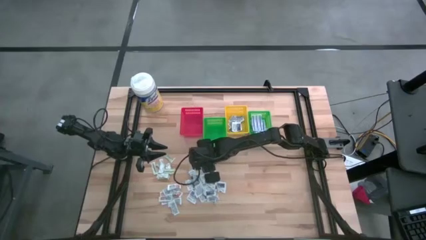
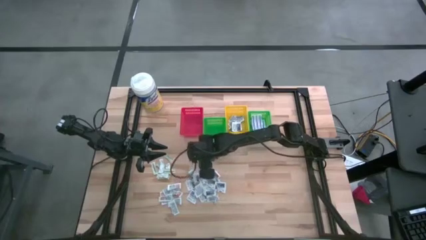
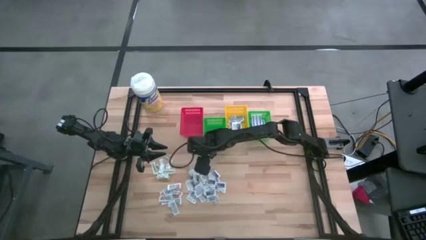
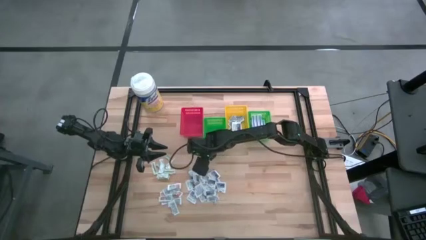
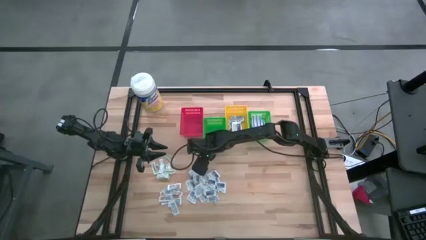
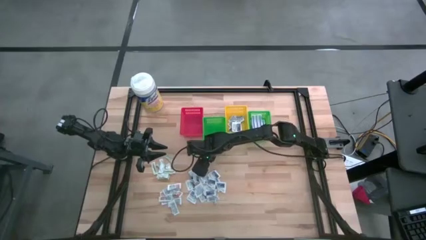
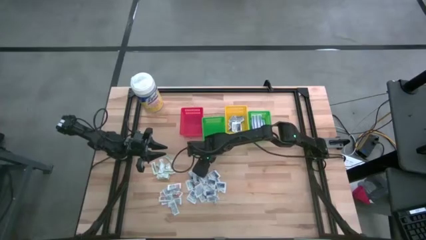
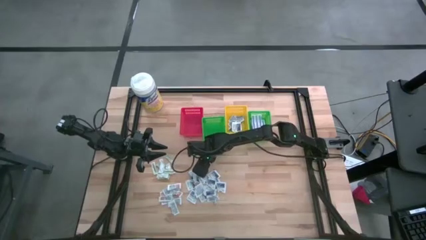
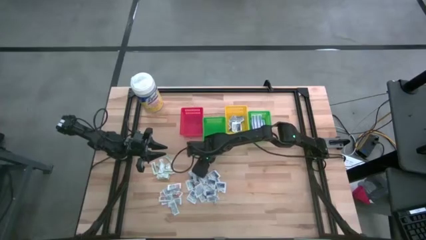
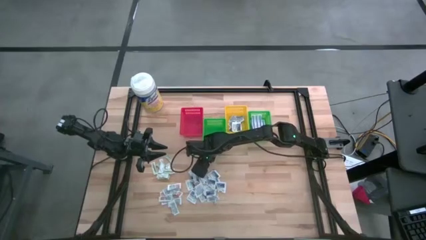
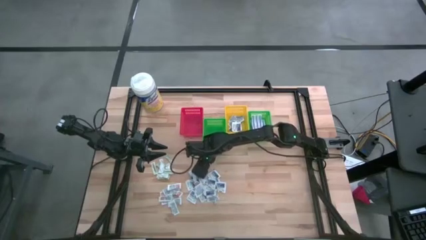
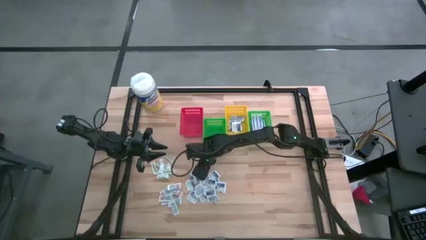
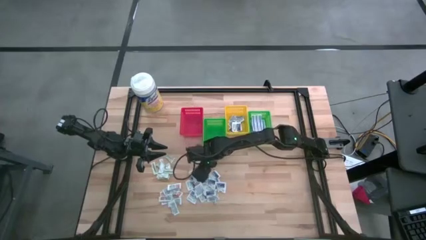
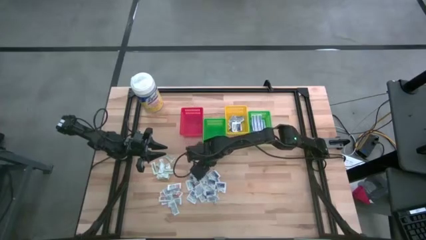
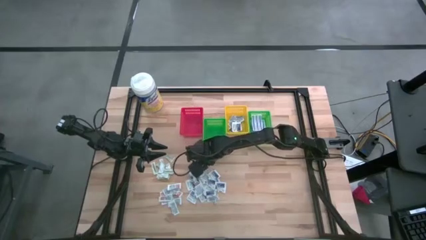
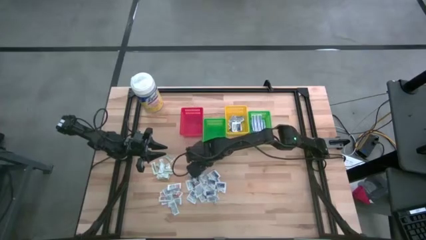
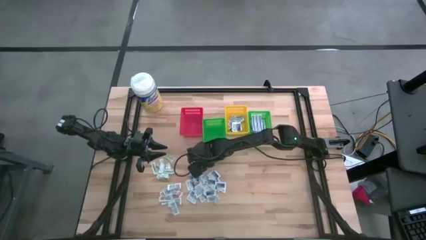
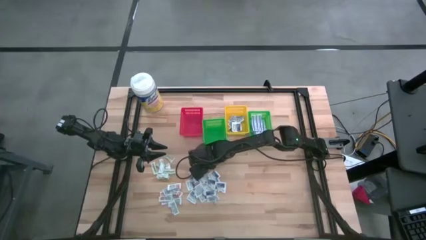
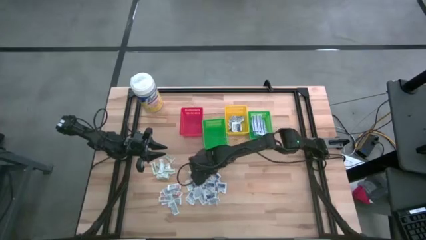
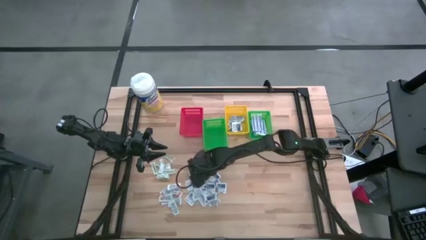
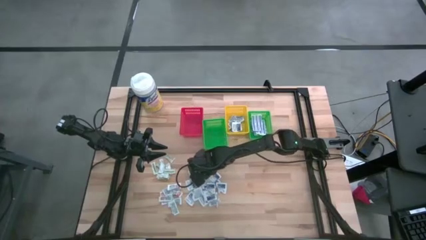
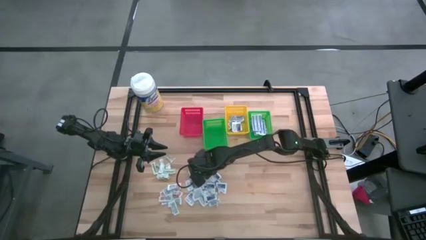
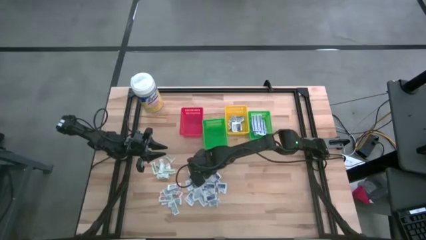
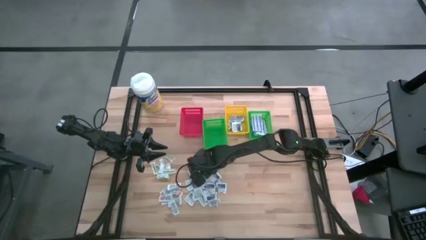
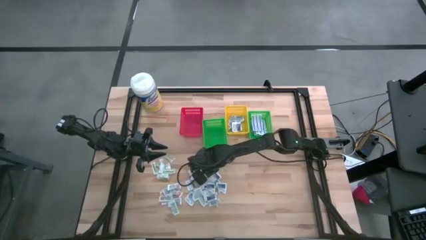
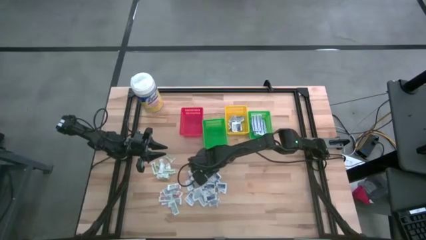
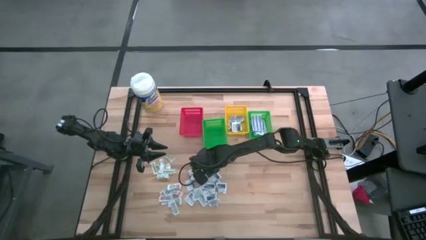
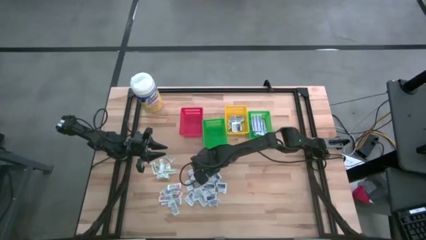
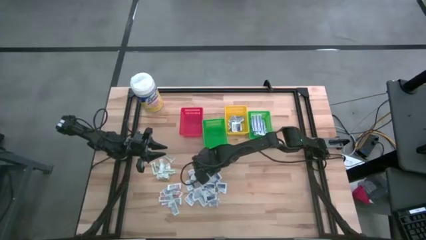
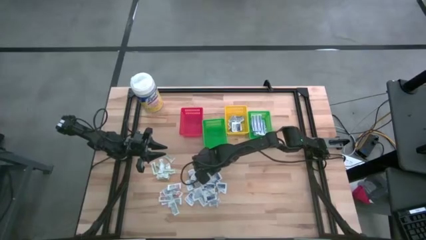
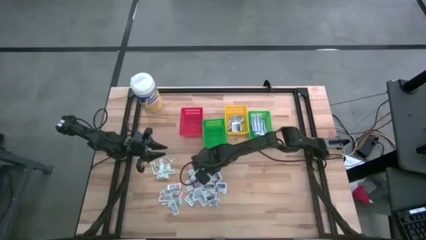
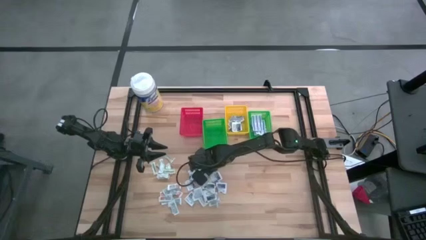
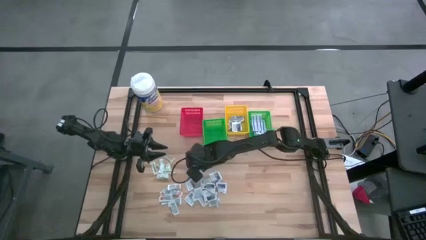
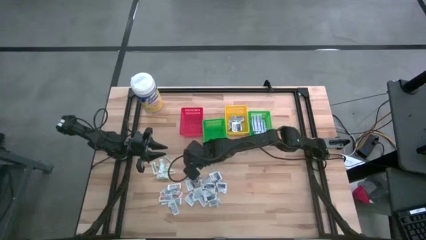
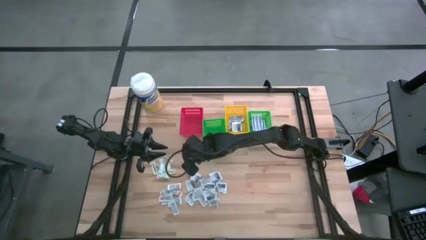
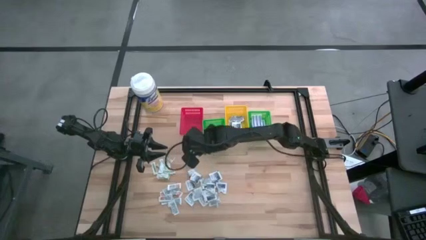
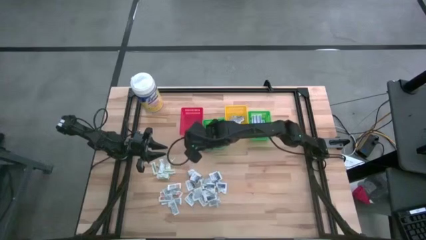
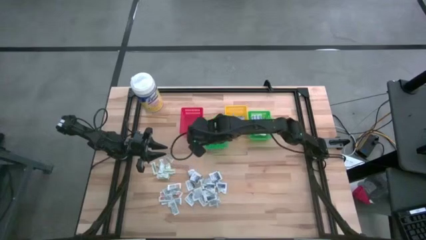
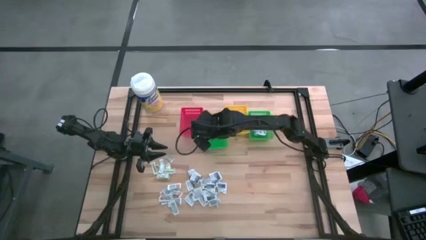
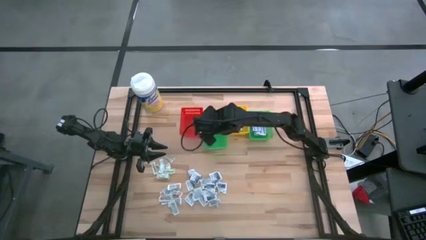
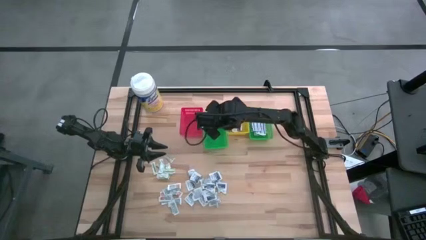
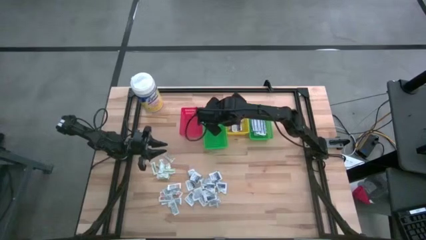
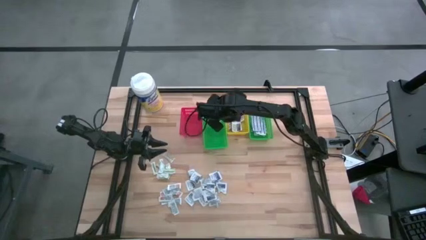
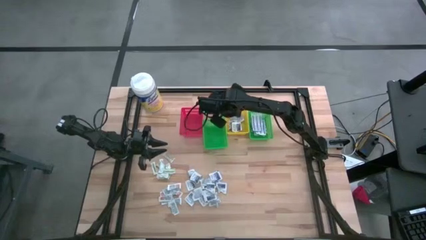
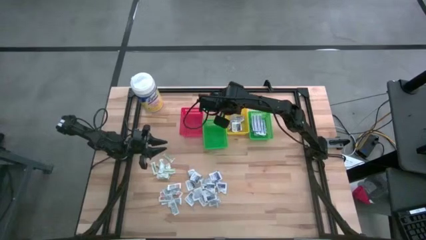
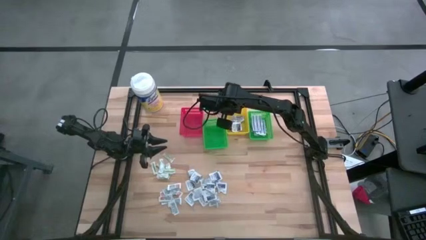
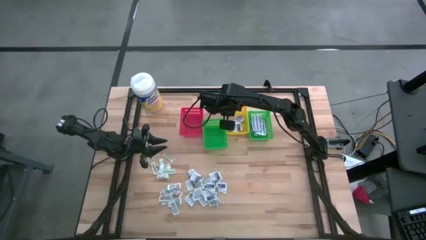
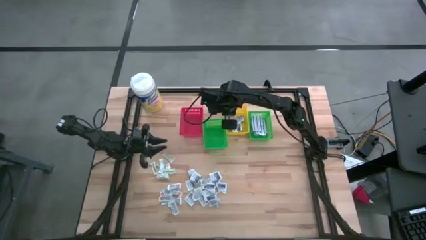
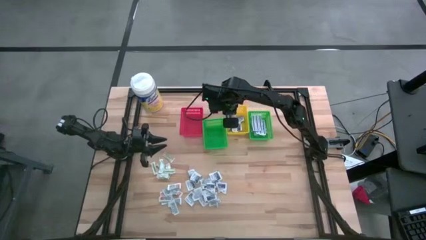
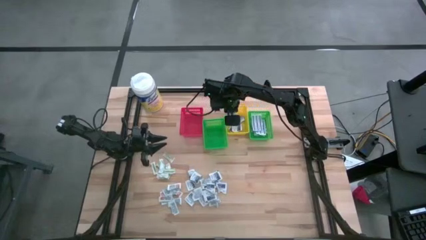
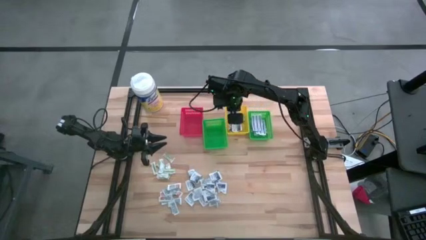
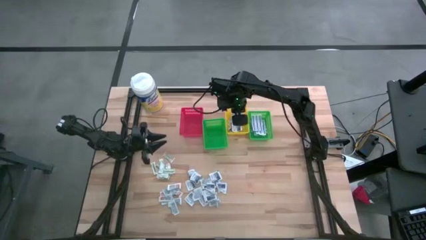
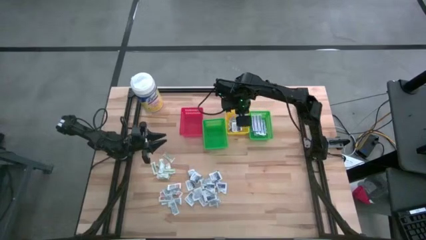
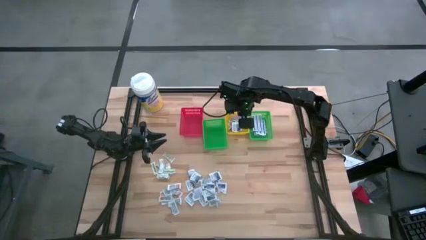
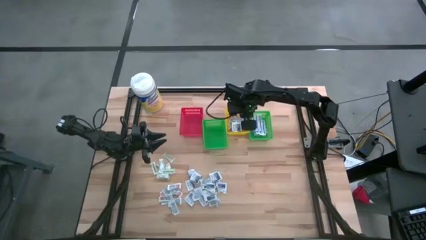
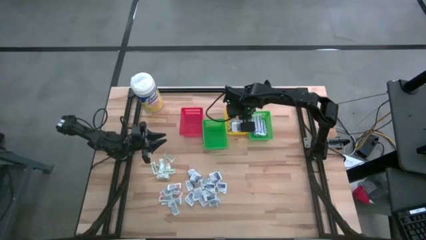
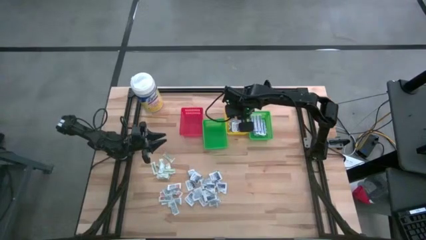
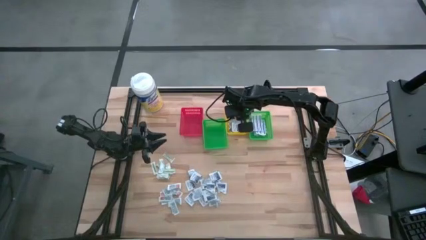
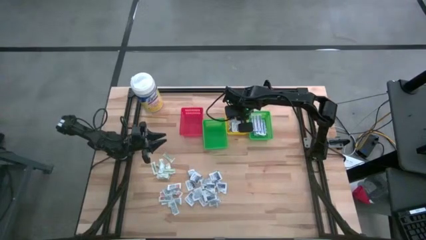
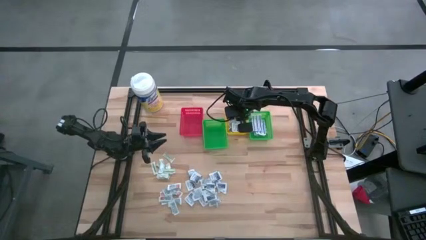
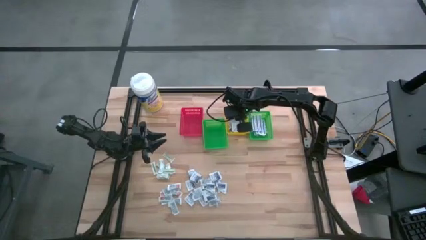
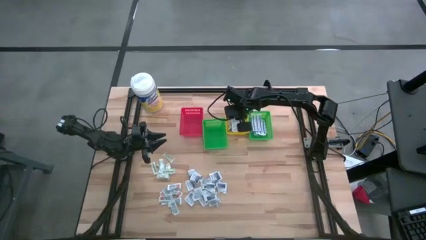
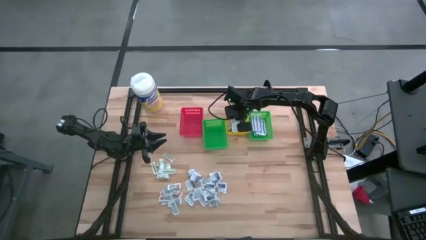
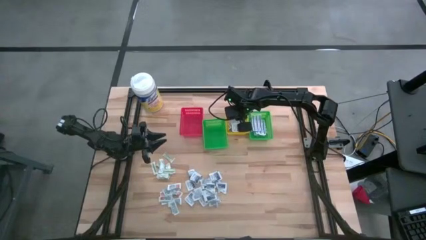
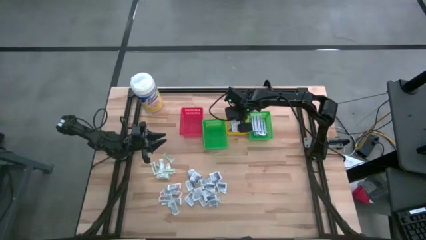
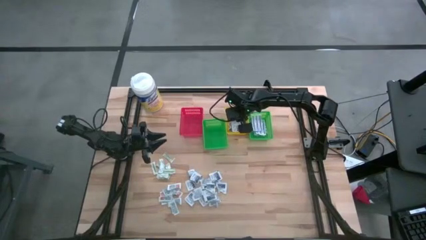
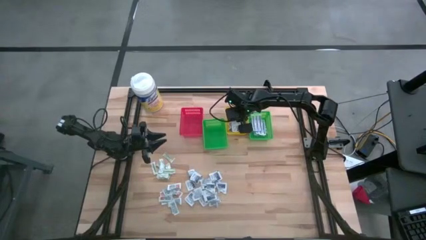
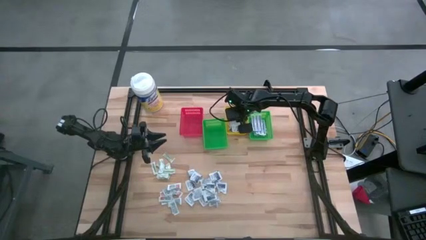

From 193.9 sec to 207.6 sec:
Task: Pick & Place First Aid Supplies
Put the alcohol pad into the yellow basket

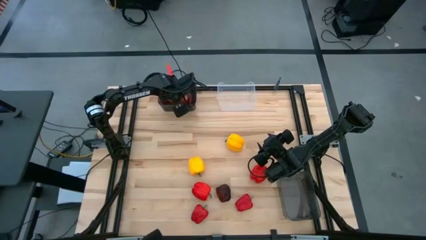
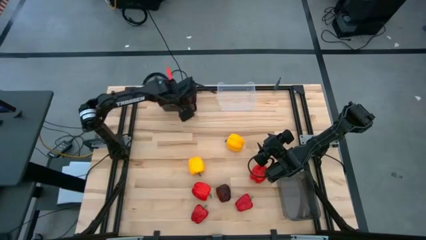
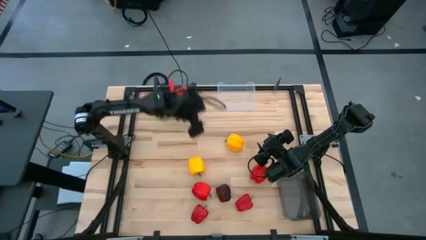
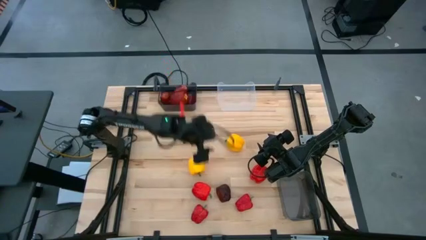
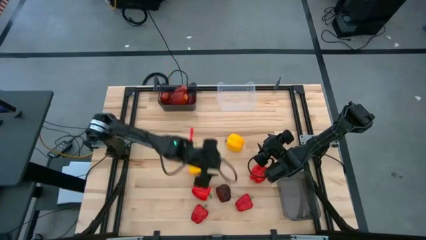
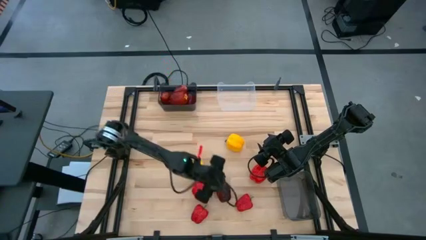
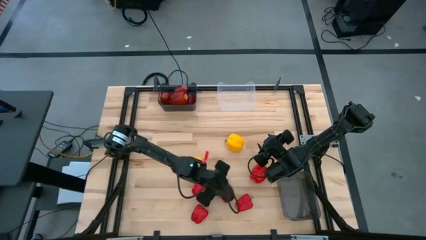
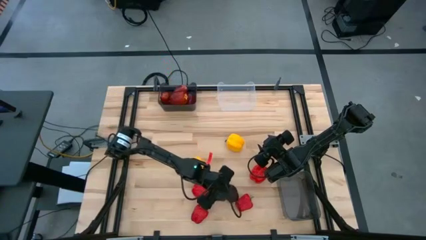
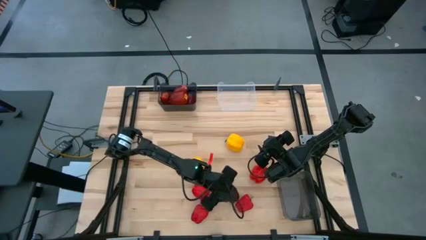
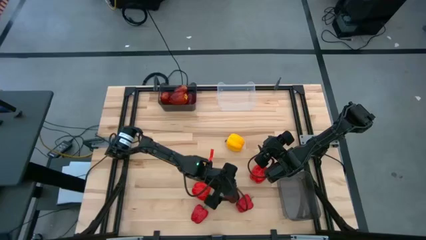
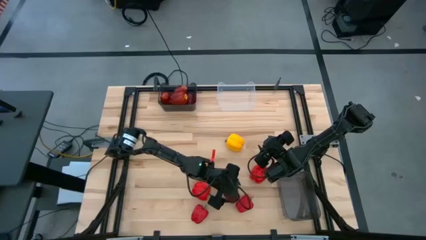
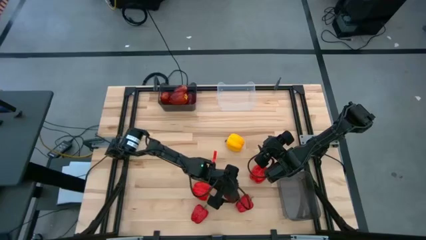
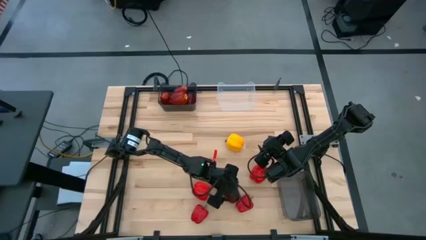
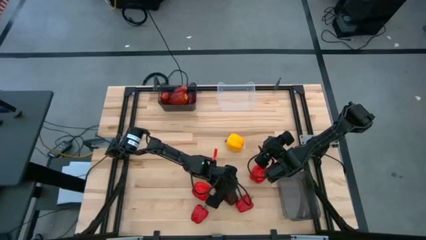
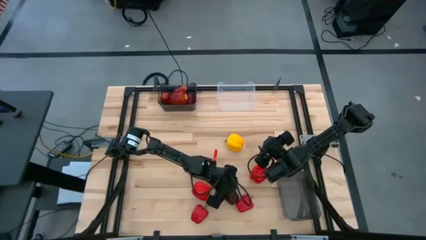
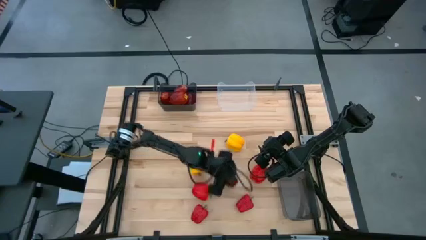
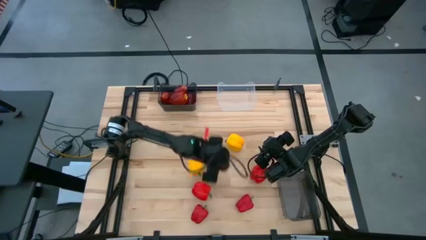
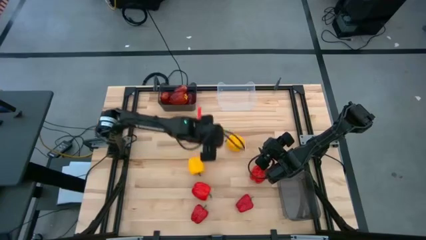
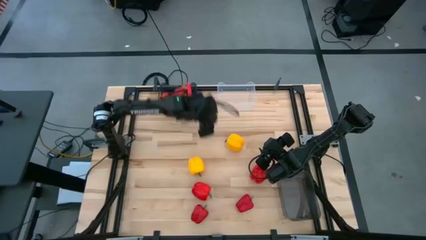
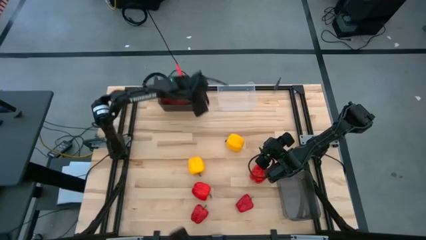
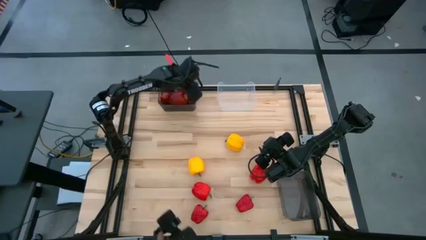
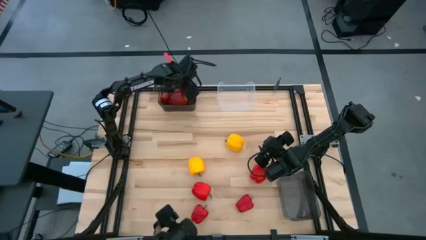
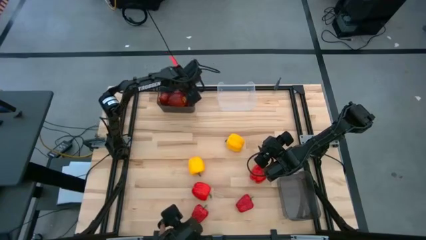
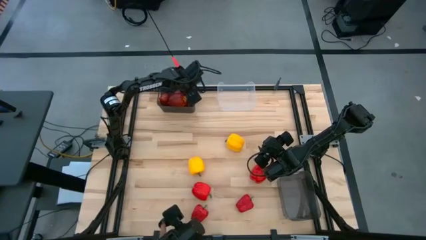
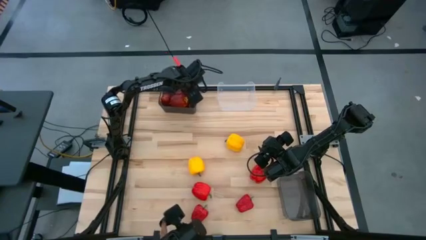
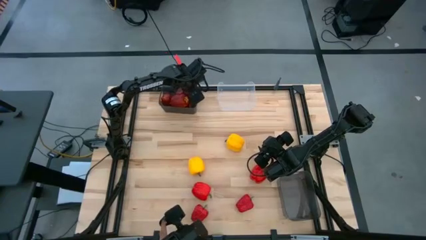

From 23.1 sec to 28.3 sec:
Task: Sort produce into baskets
Put the red apple into the top black bin
